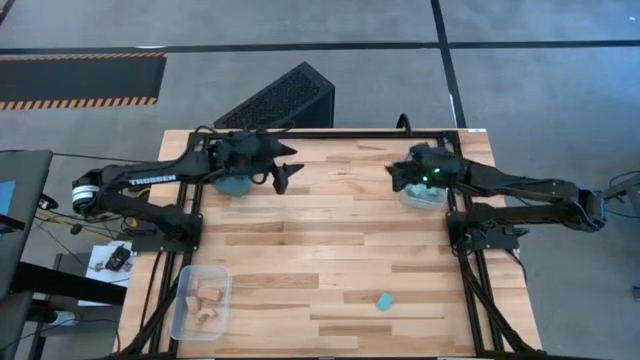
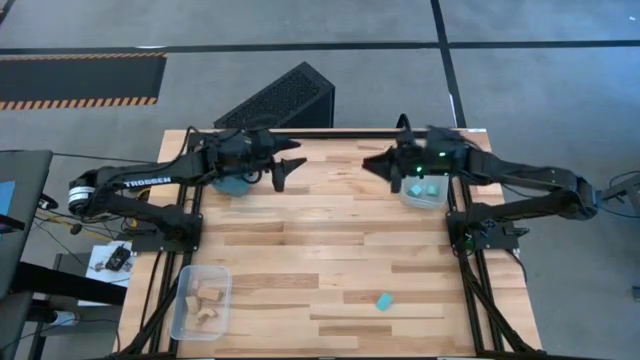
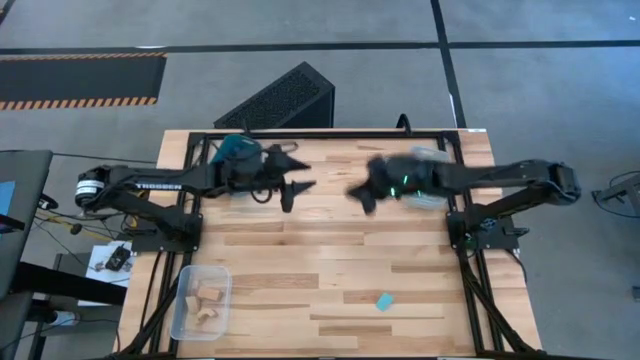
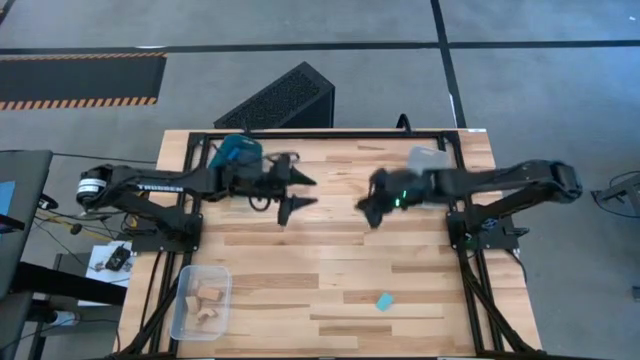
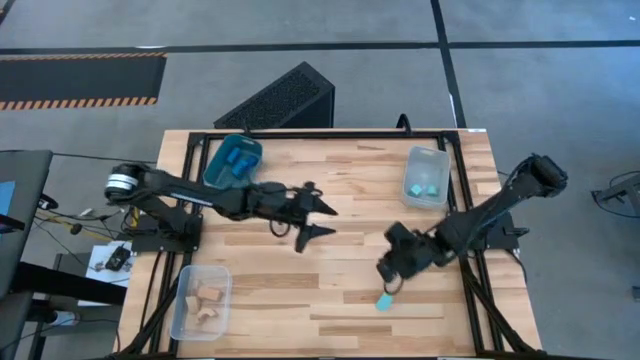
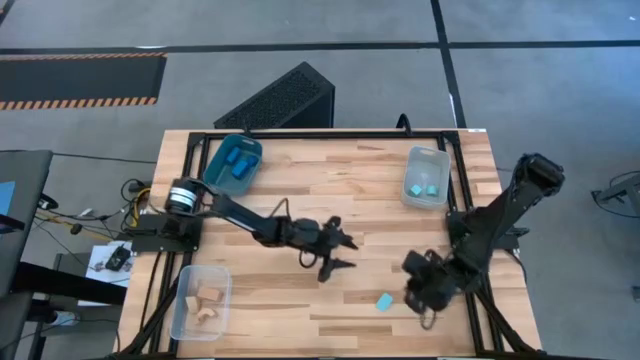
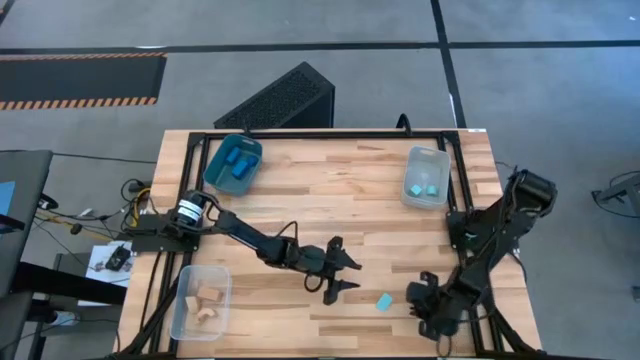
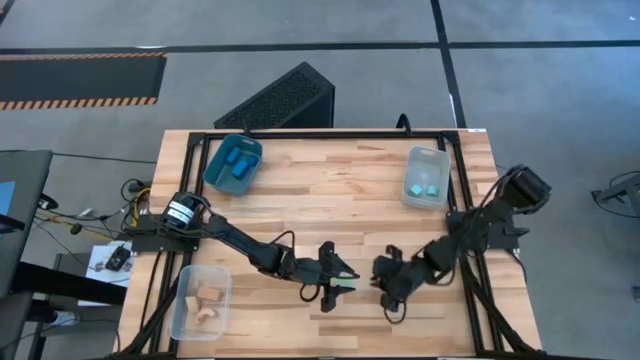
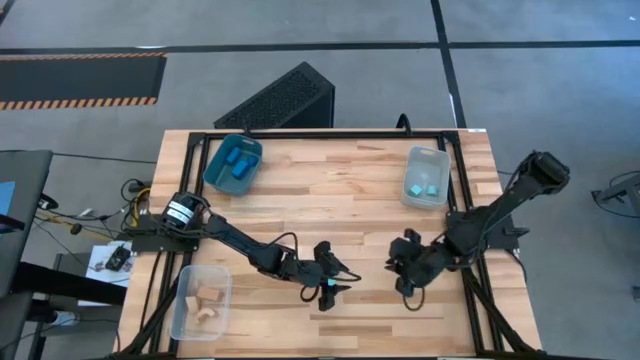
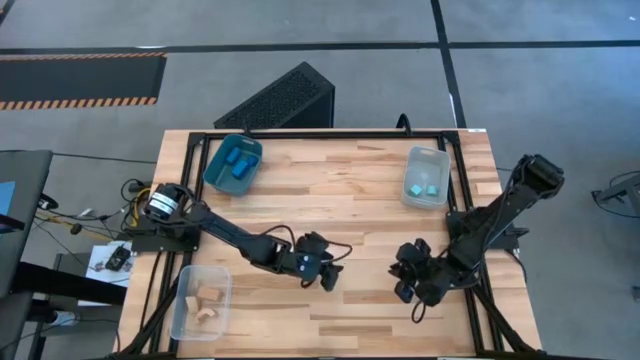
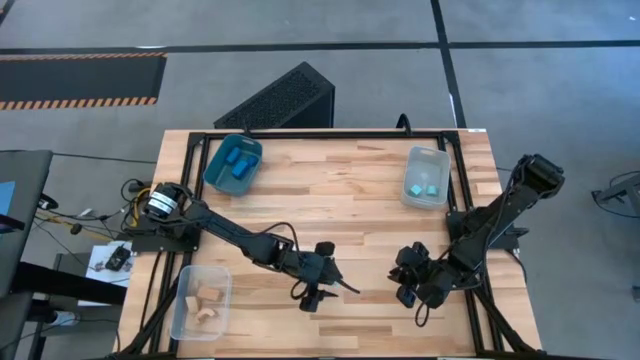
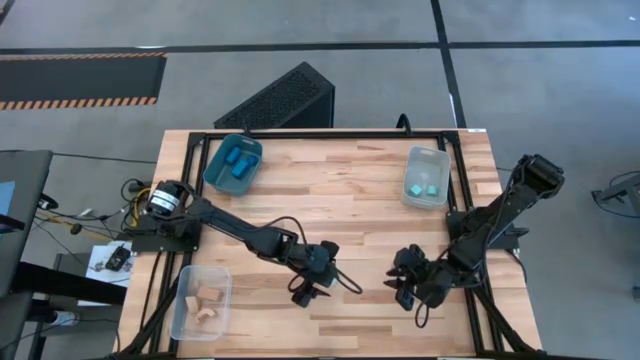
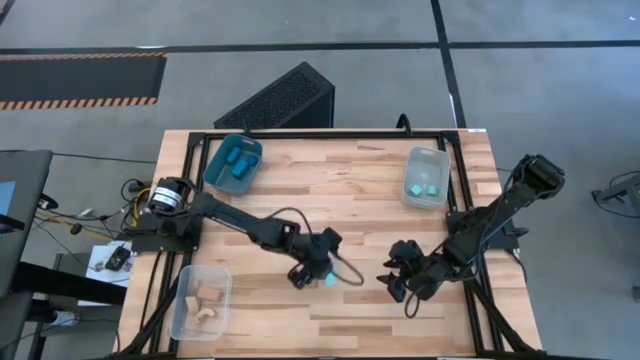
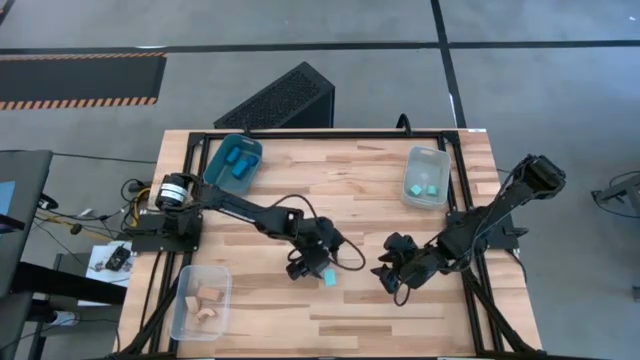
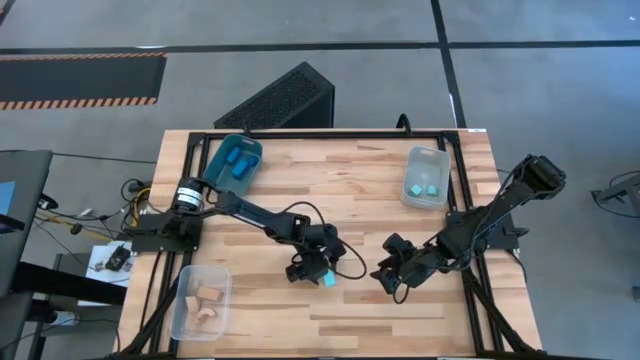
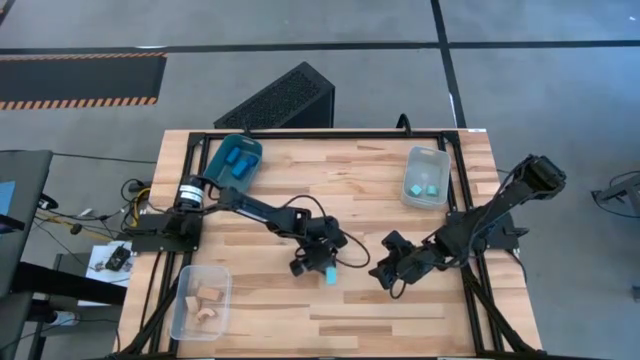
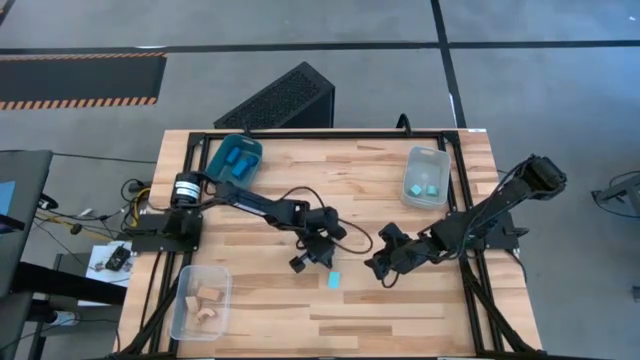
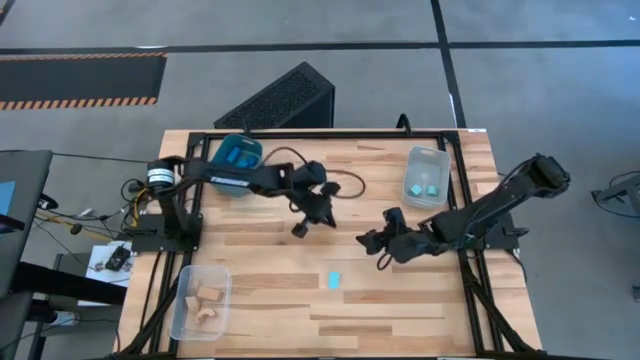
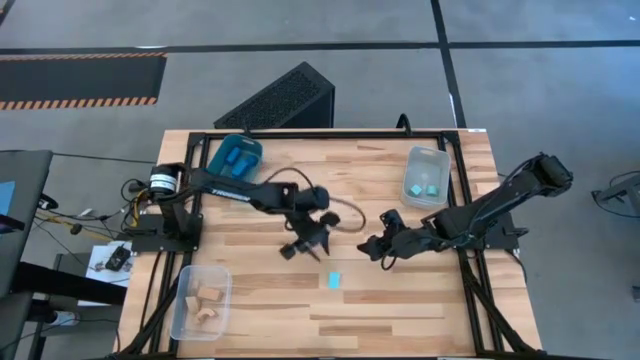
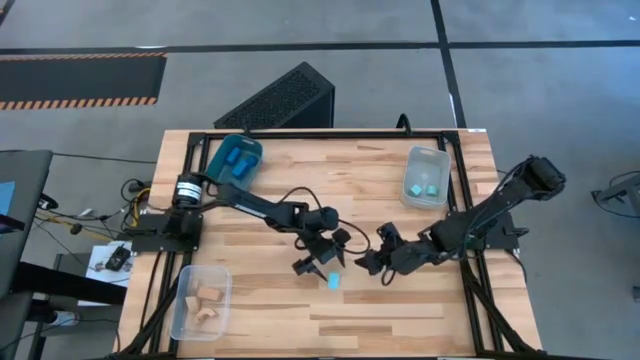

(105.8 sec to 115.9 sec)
Task: Sort & place blocks by color
Put the light blue block into the gray bin

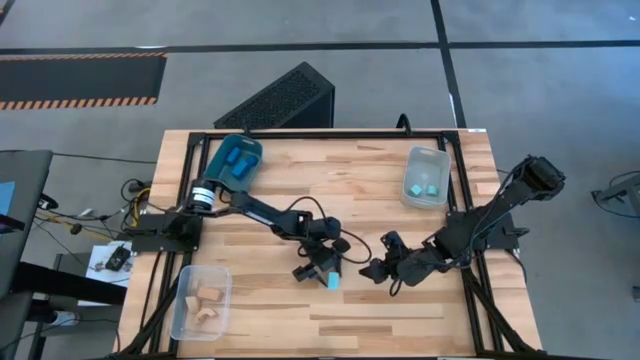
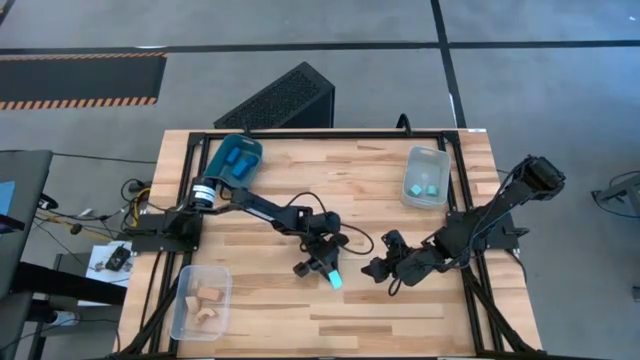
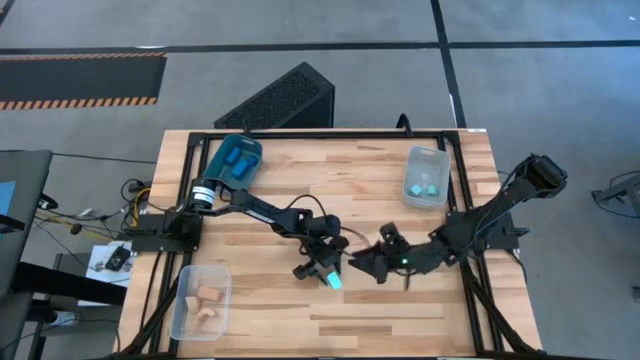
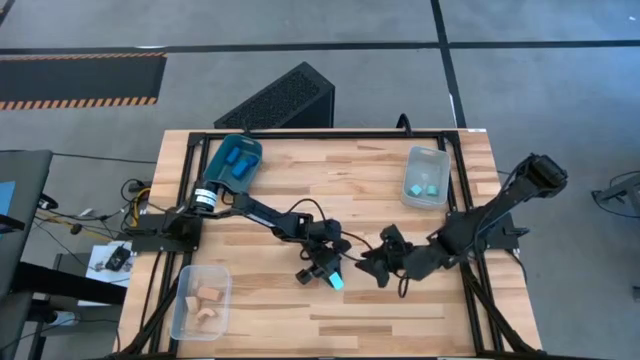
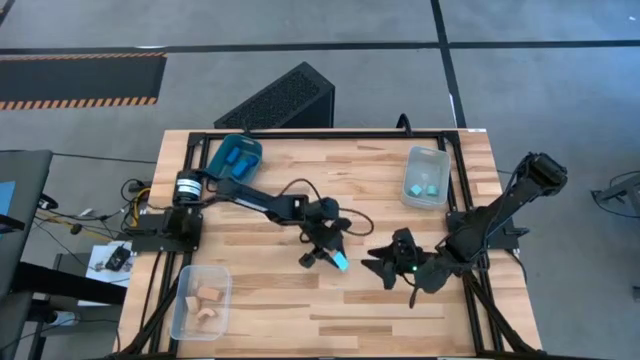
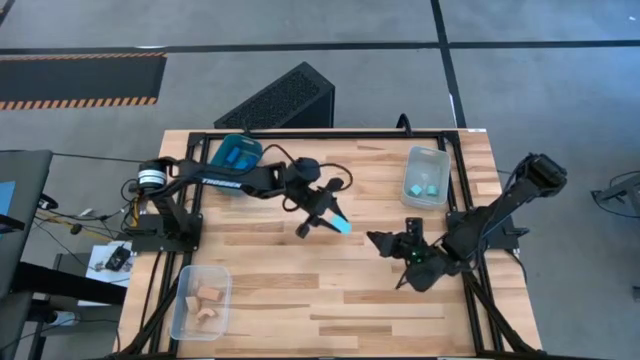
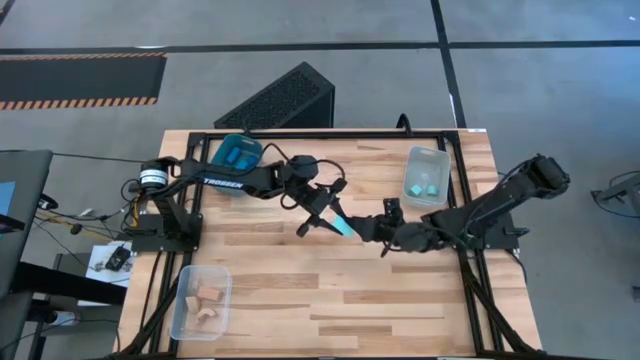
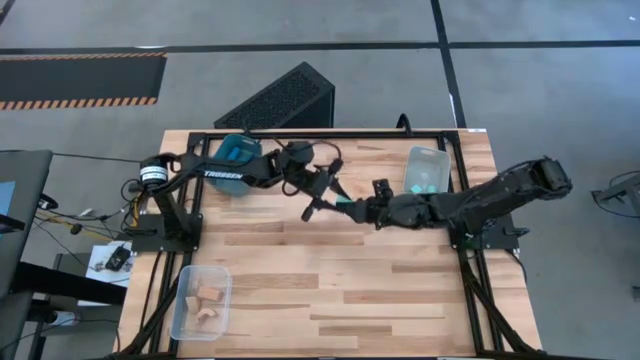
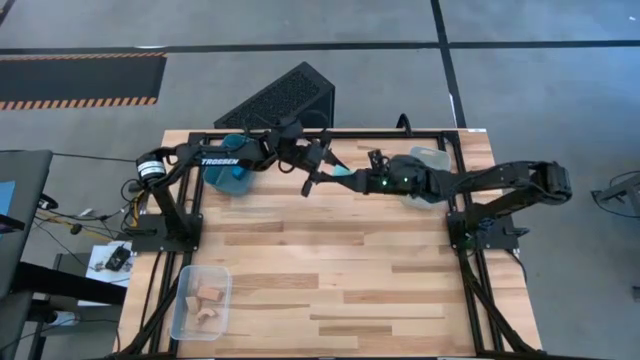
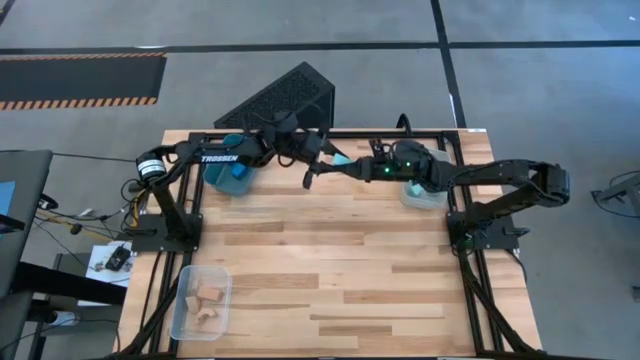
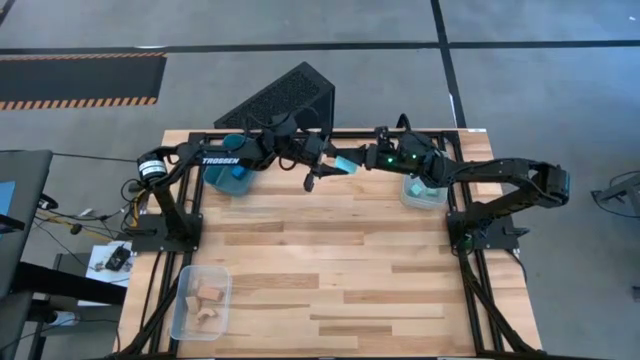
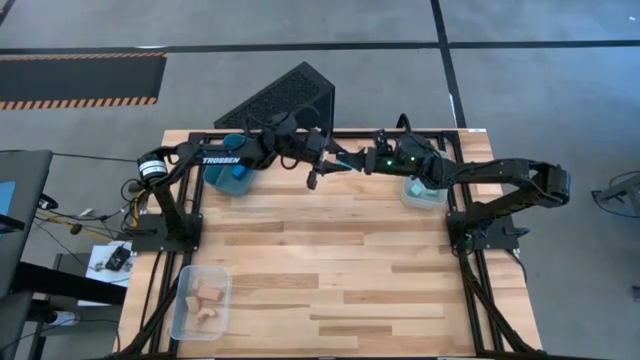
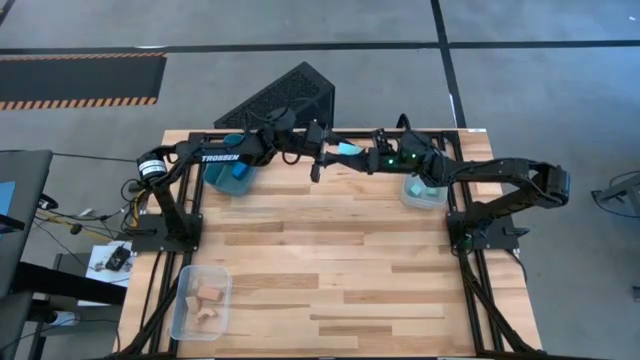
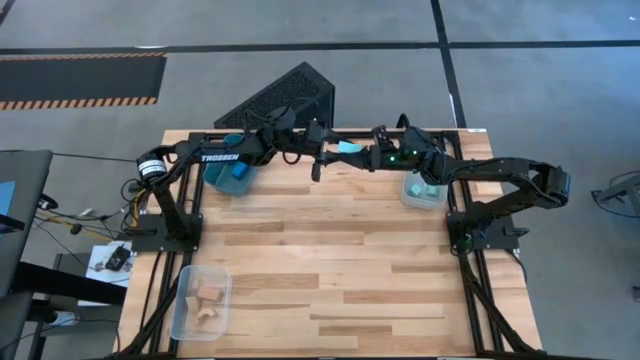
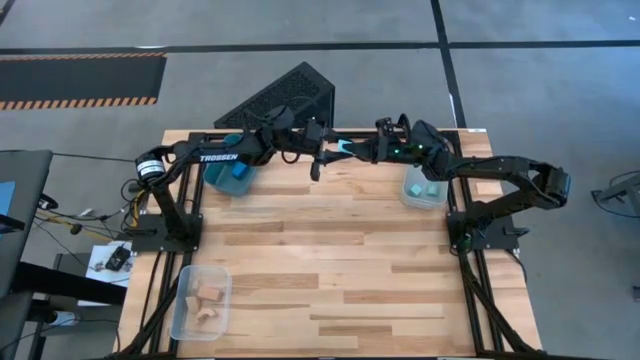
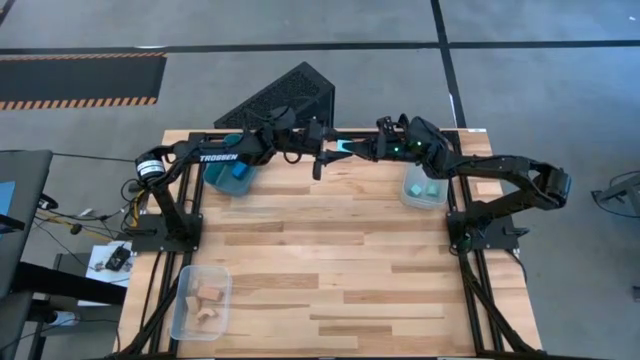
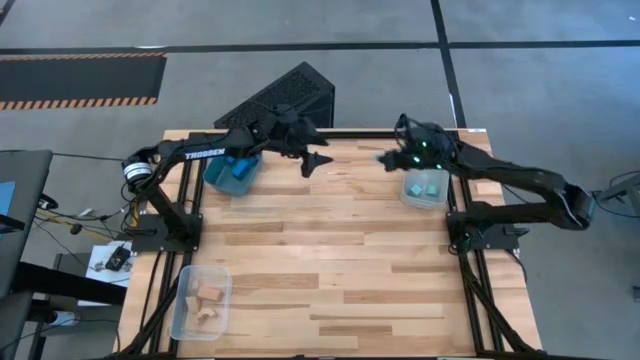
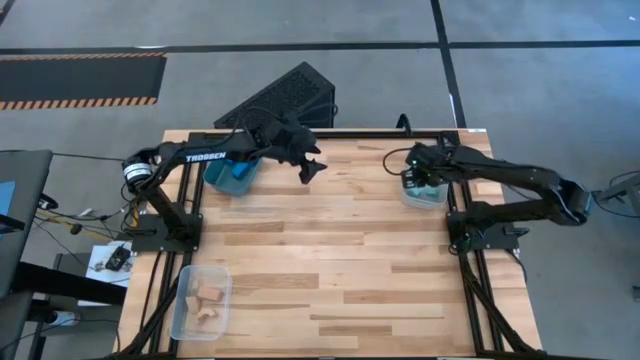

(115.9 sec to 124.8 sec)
Put the light blue block into the gray bin

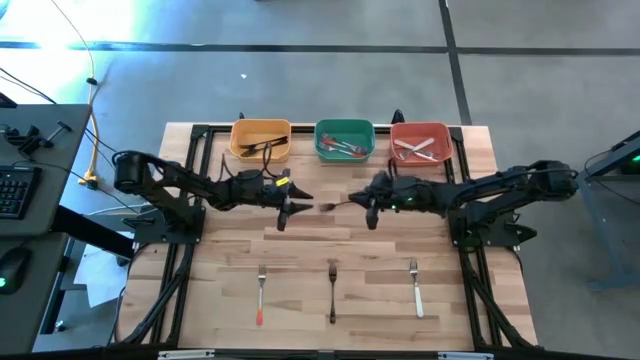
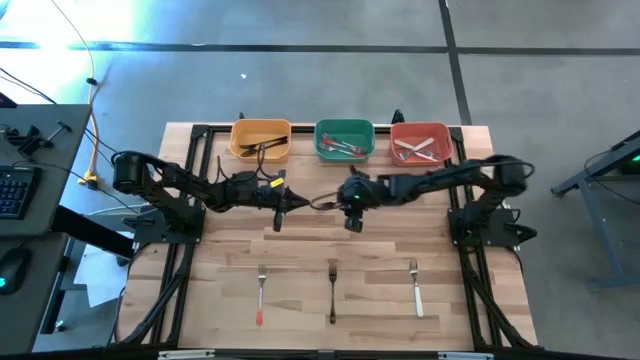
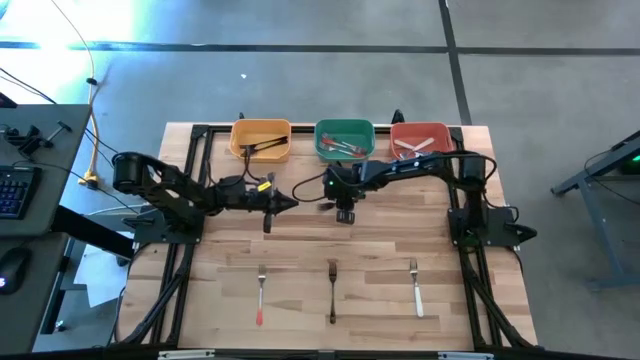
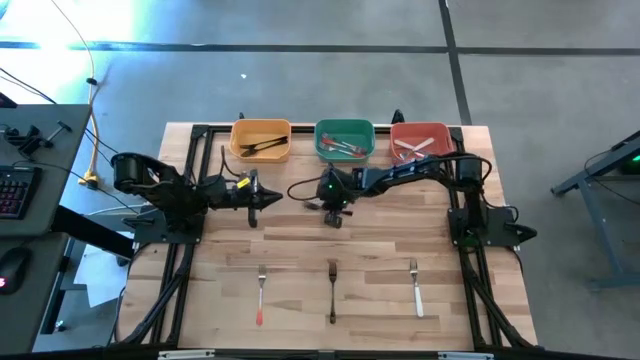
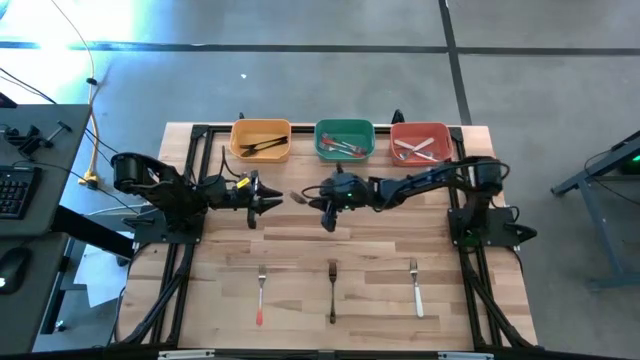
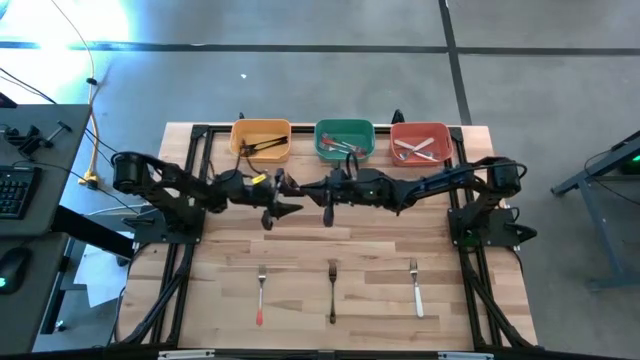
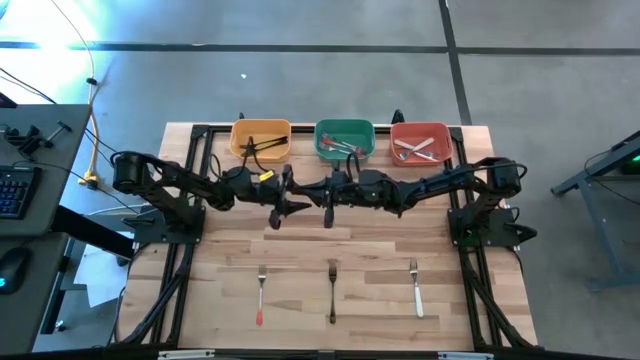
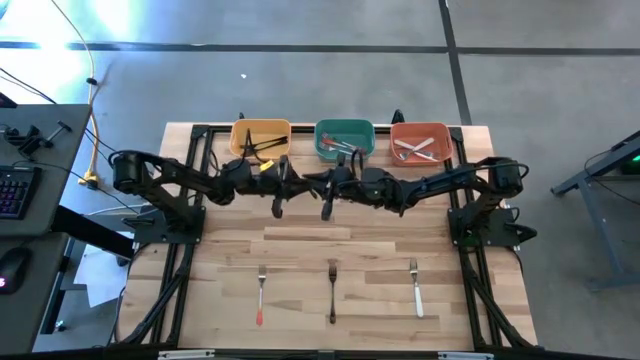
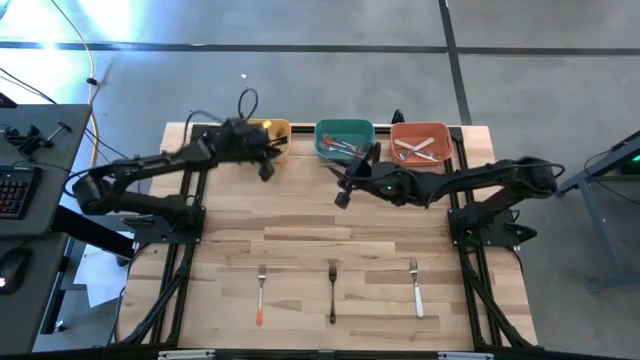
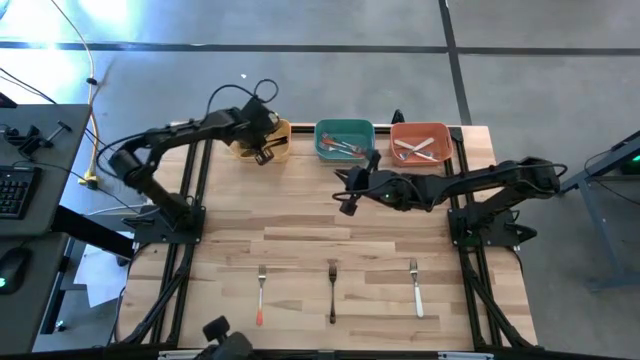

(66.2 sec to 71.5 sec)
Task: Sort silverware by color (type)
Put the top black fork into the yellow bin
